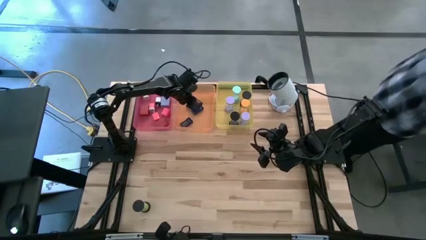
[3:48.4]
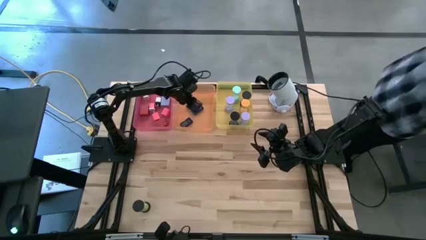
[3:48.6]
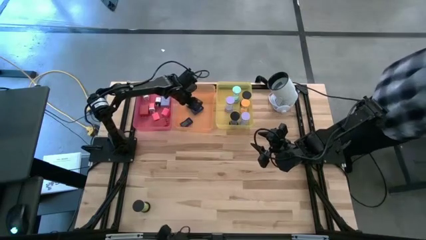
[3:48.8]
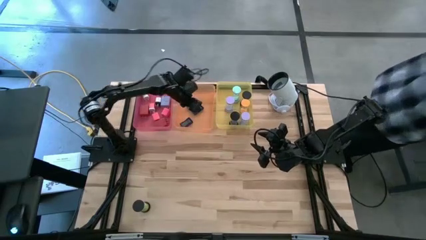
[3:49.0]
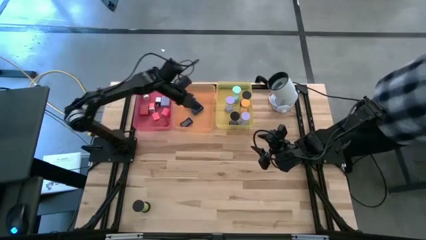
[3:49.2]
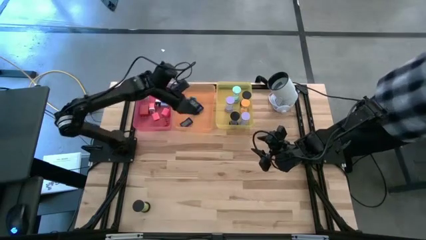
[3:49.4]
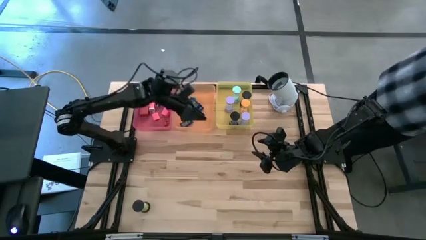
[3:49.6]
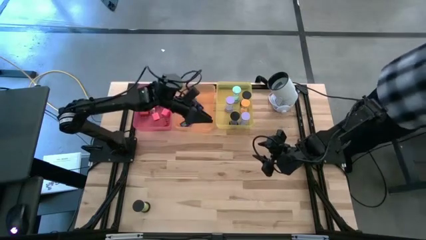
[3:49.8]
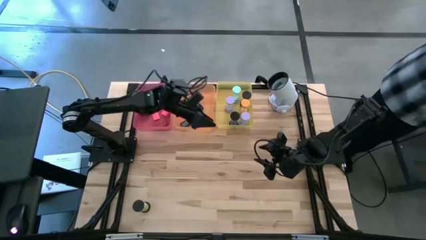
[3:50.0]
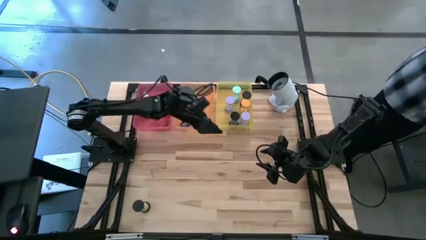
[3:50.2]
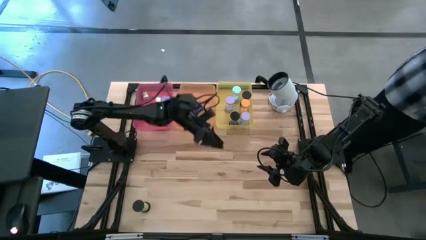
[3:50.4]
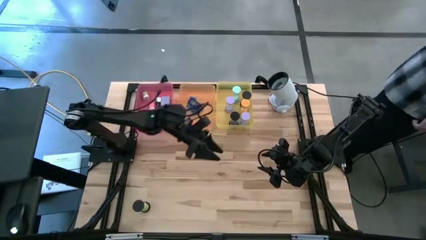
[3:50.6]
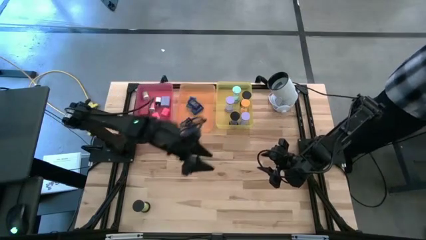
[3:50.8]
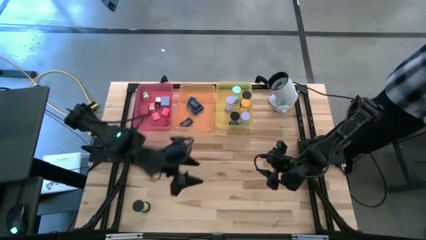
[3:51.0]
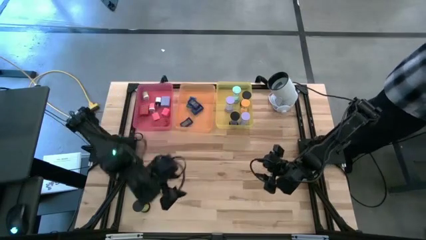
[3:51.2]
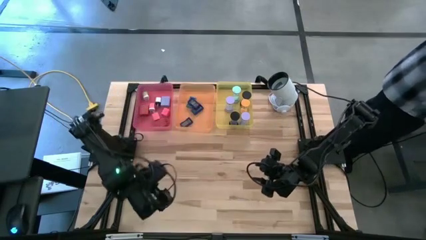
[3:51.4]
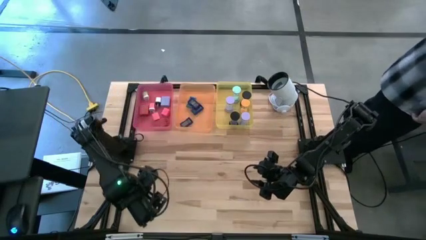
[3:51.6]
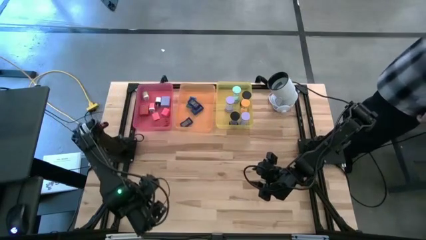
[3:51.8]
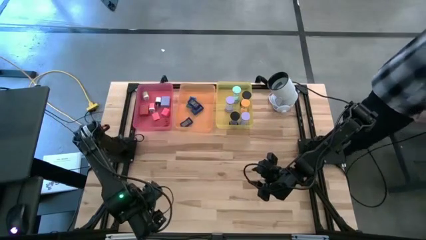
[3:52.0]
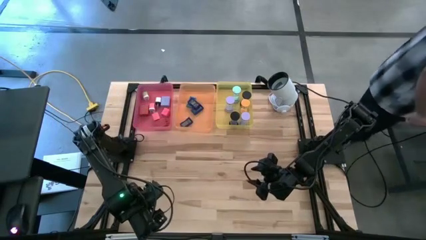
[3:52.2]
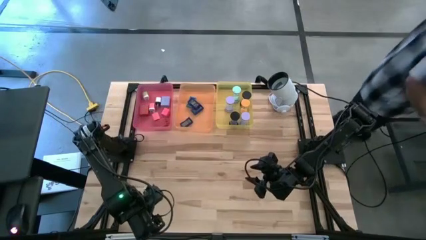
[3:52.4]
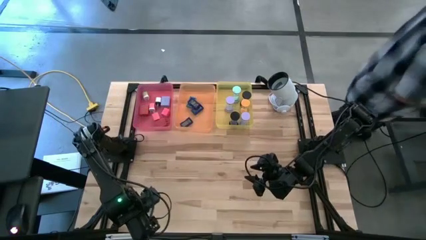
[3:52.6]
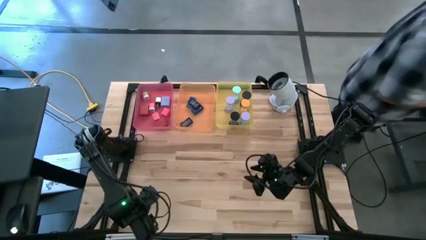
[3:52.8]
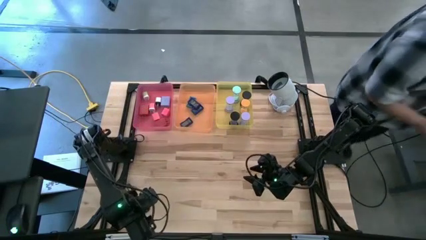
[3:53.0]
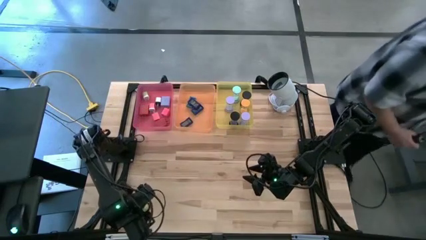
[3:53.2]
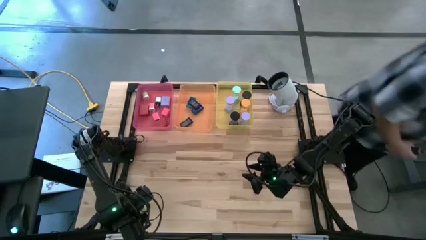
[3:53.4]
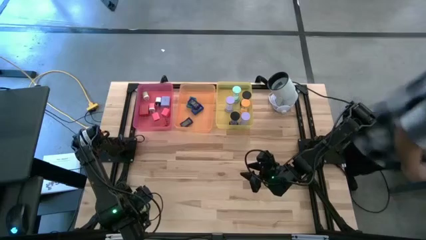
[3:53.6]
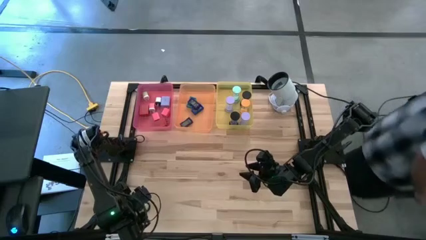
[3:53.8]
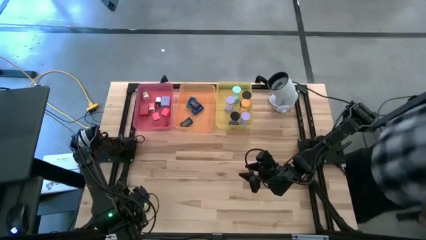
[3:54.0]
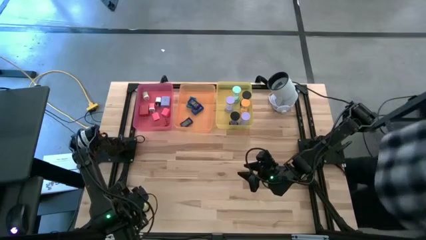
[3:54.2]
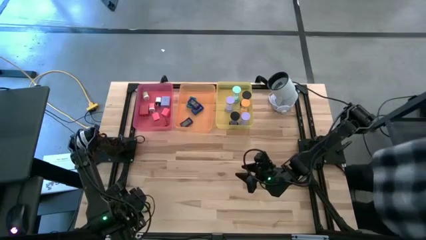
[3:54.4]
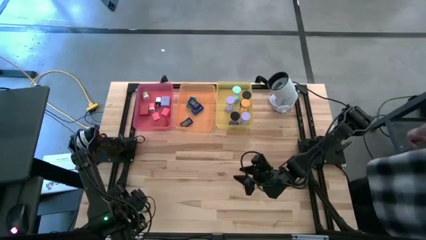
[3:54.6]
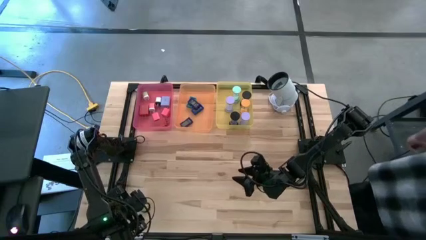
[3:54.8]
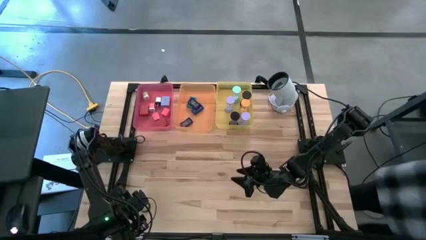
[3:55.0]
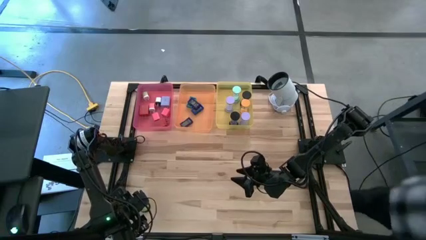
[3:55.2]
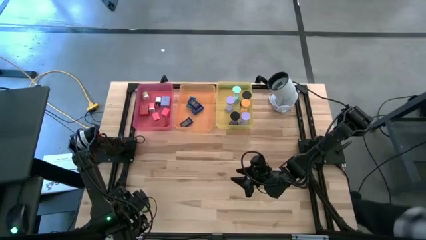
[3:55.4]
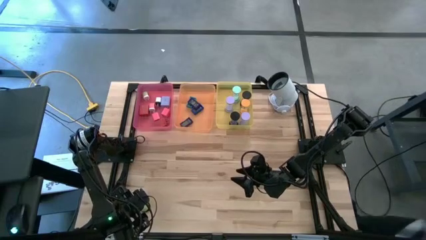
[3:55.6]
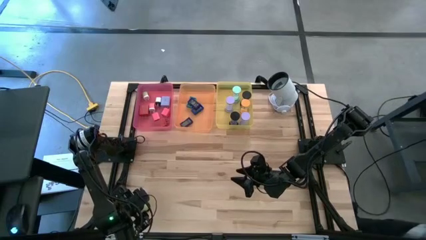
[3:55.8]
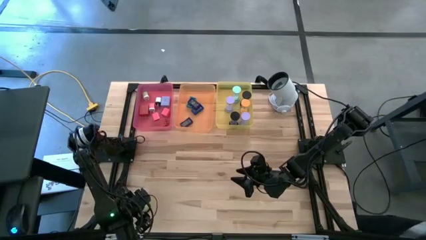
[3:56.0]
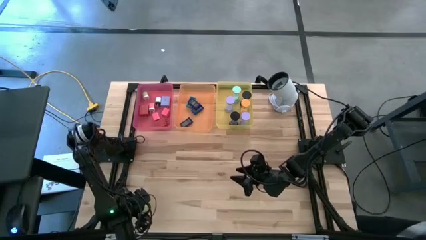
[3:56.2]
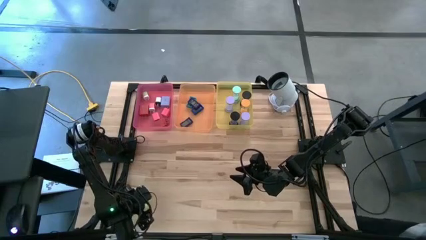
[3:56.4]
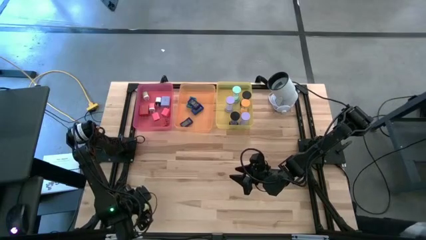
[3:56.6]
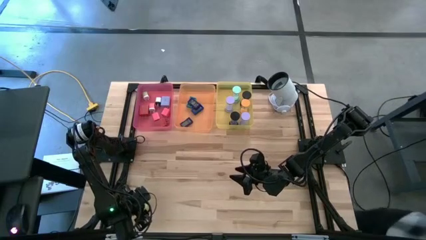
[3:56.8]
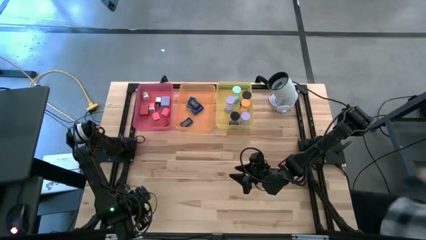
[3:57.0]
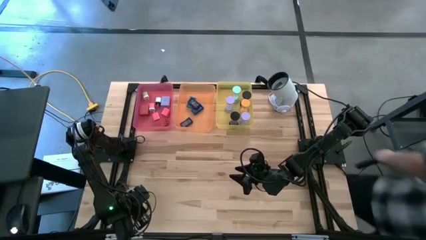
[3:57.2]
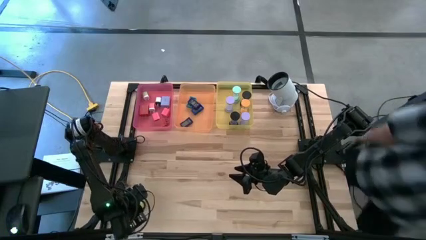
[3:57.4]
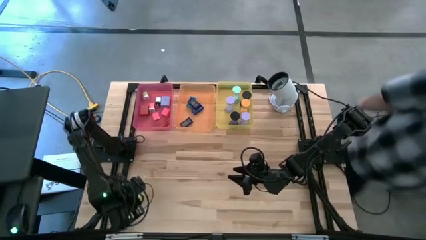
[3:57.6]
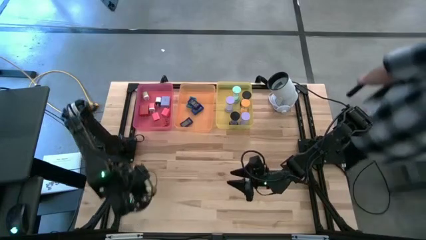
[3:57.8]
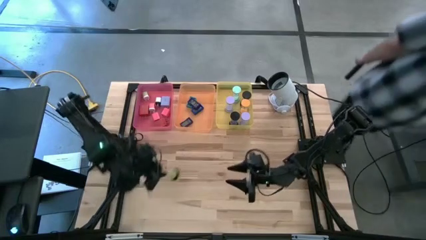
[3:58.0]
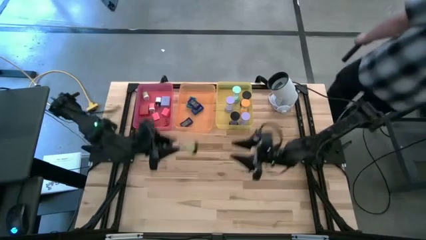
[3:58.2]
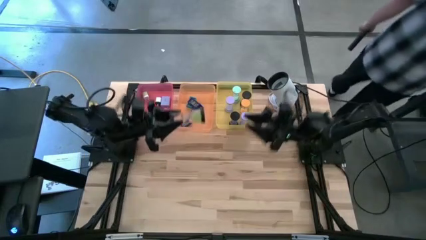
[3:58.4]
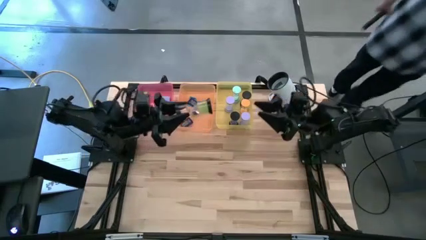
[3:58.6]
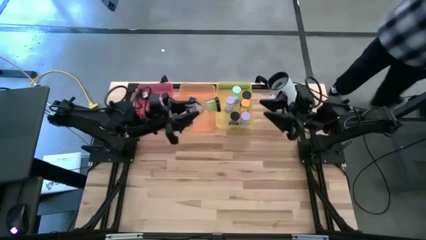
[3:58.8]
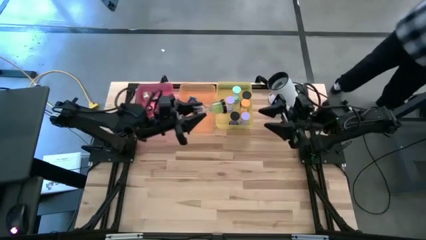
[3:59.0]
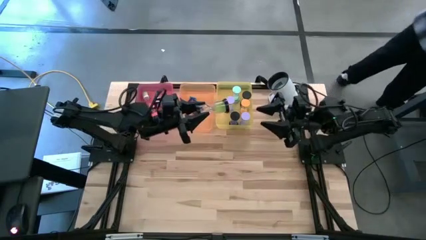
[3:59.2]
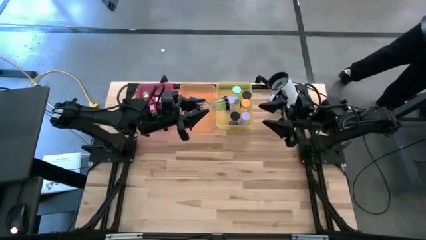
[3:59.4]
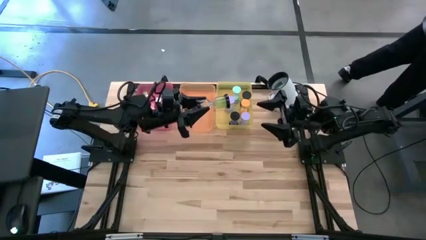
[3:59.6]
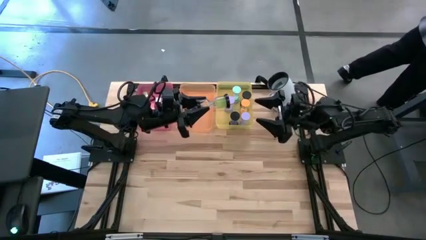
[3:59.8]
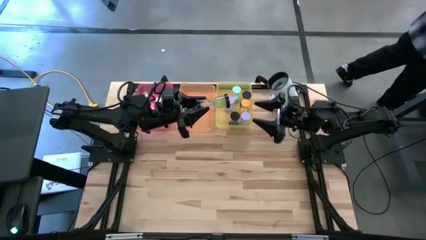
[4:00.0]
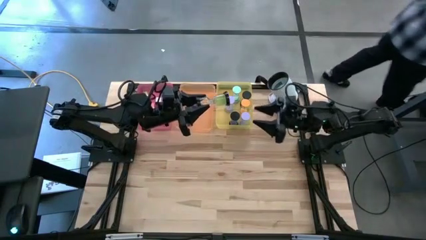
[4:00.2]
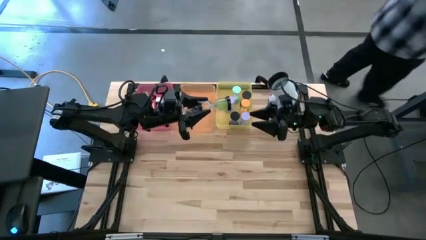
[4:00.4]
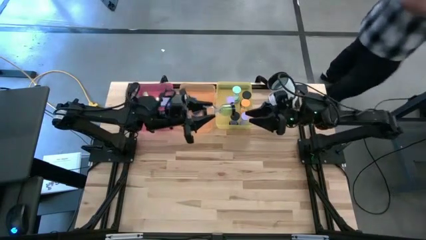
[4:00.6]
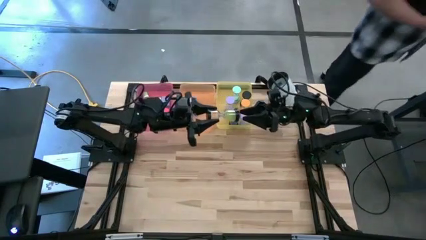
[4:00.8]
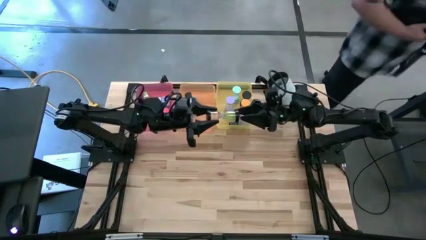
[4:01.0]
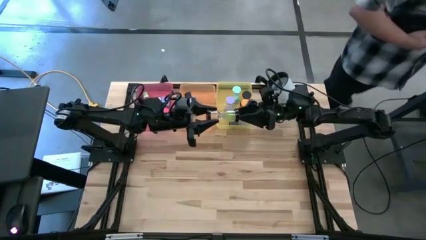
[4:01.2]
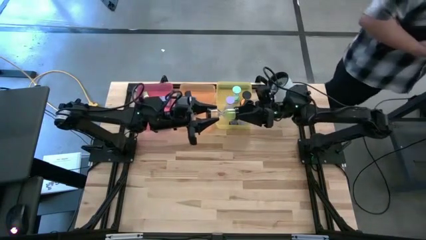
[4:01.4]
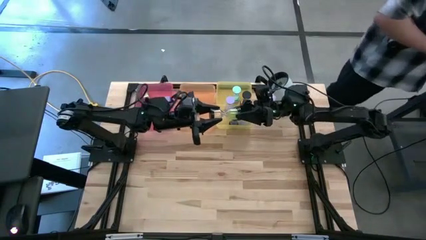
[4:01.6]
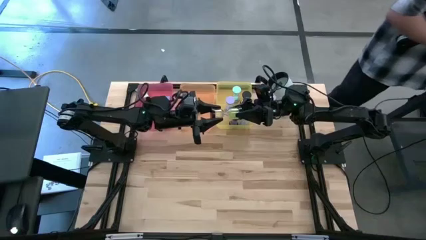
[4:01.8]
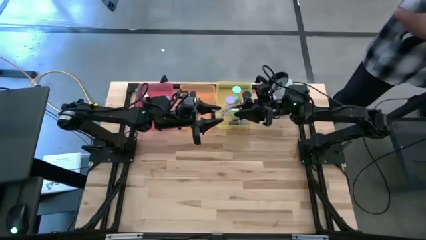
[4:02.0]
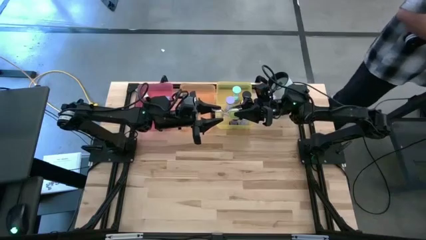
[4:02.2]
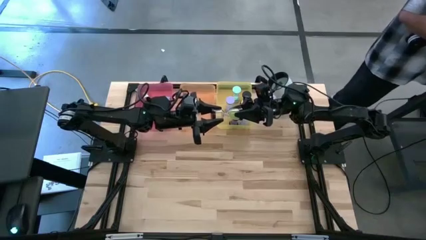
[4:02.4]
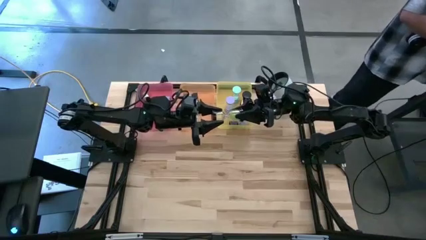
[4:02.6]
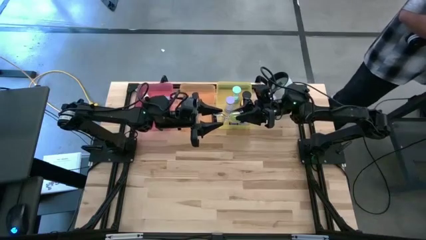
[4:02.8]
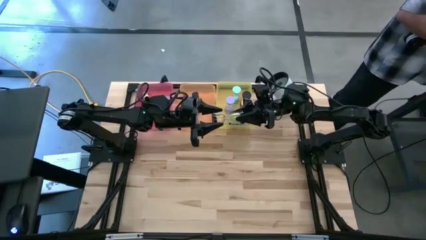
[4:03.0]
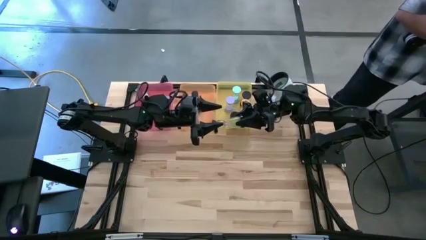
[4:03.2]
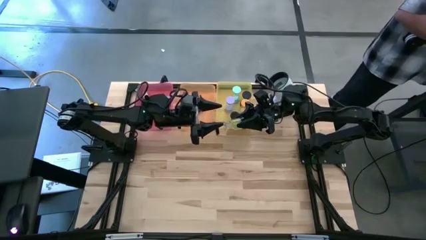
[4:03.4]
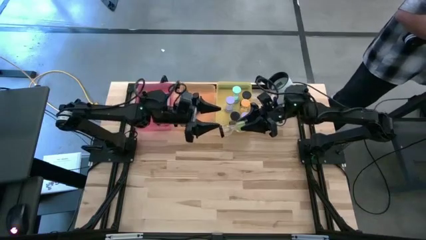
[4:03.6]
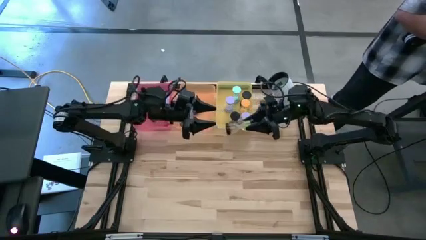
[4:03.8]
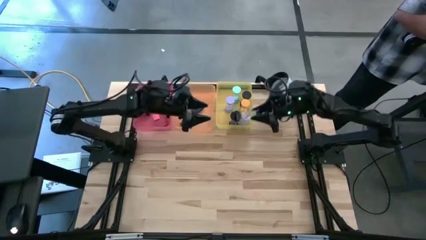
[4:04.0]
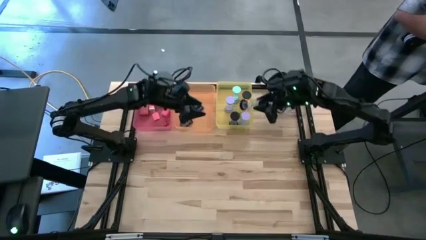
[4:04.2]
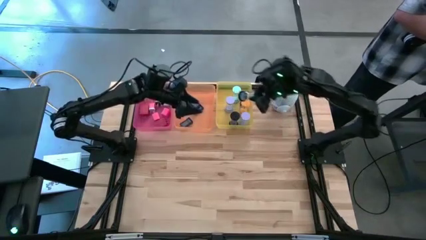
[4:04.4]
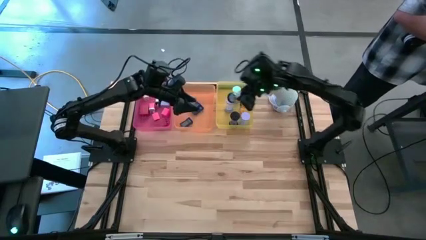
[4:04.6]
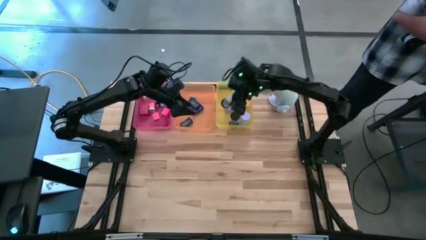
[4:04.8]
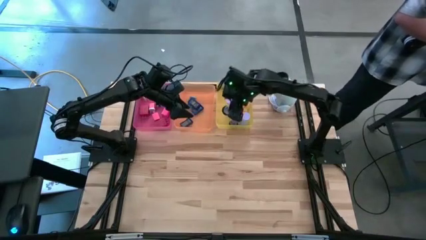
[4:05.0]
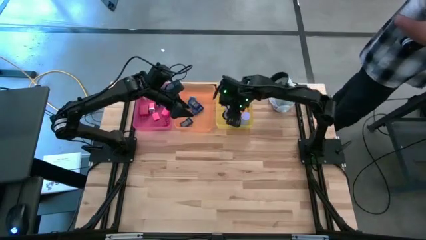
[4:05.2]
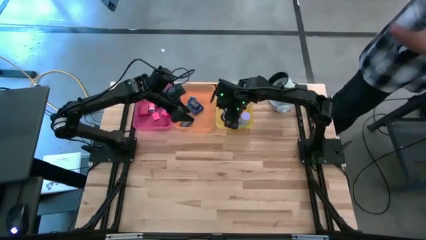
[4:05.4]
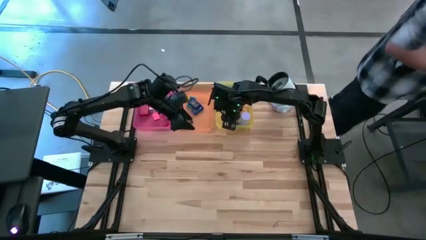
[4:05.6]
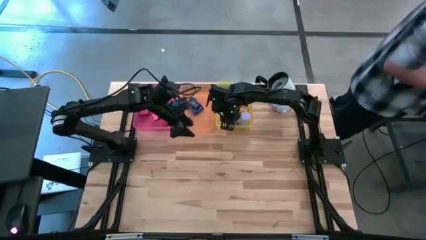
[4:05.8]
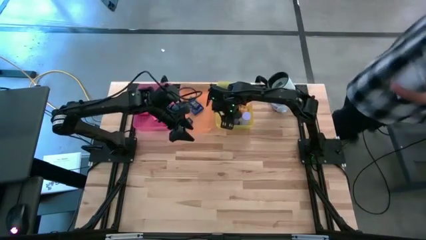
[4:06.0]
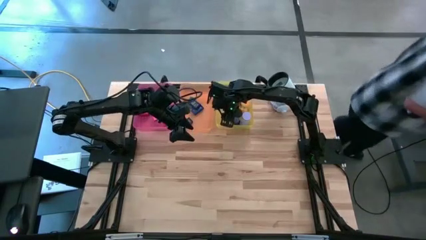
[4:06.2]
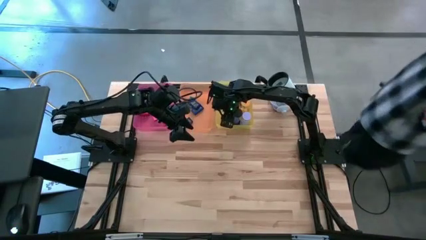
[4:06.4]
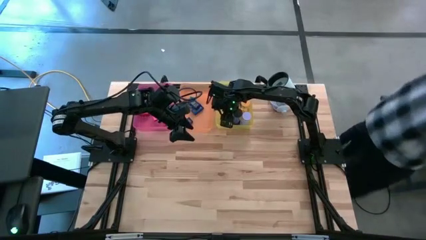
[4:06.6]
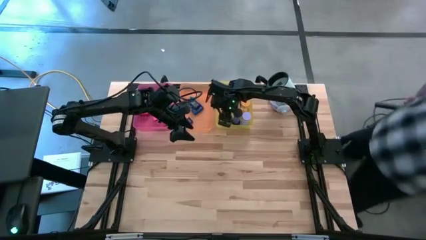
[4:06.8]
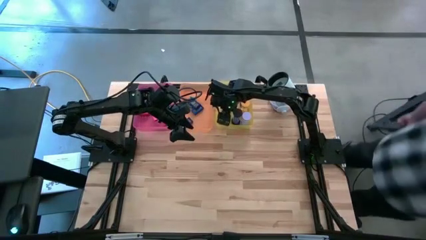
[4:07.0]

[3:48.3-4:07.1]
Task: Pick & Place Office items
Put the green hourglass into the yellow bin
